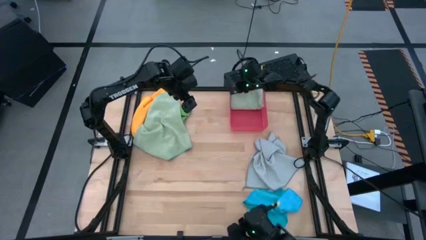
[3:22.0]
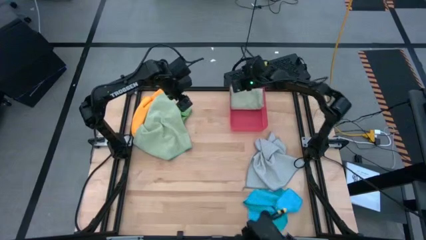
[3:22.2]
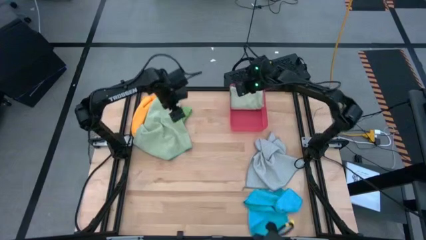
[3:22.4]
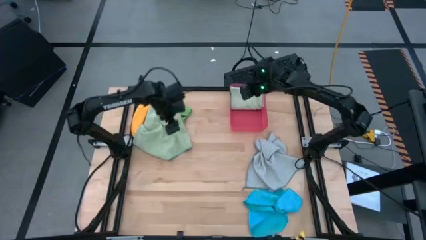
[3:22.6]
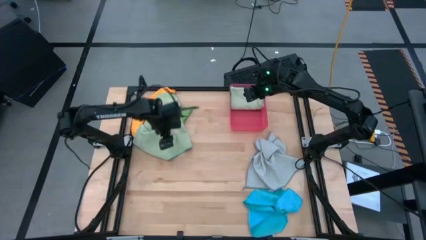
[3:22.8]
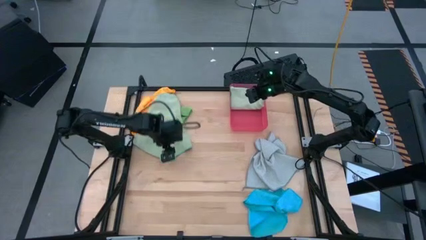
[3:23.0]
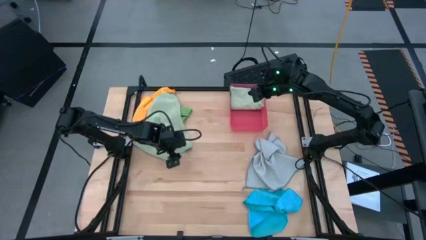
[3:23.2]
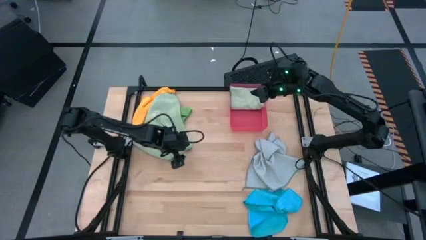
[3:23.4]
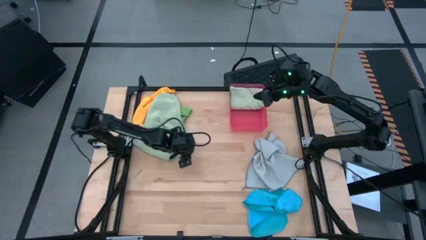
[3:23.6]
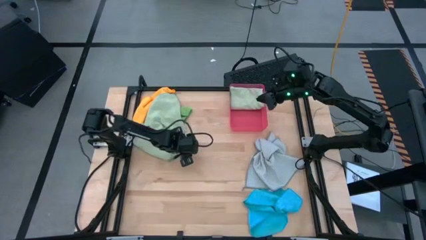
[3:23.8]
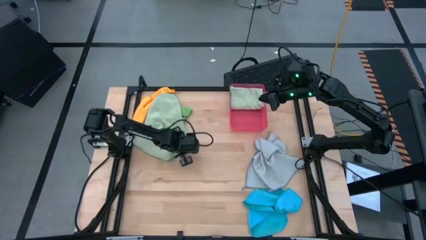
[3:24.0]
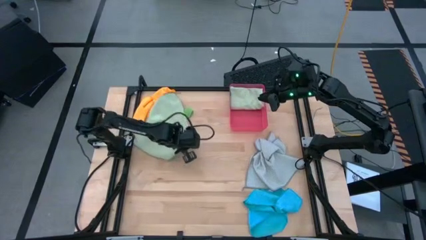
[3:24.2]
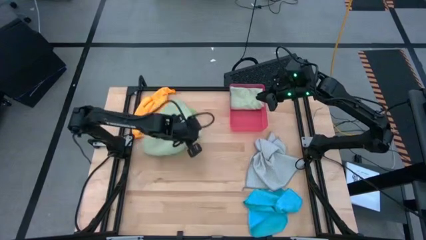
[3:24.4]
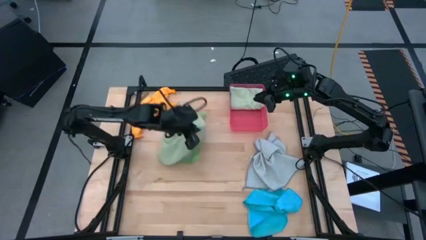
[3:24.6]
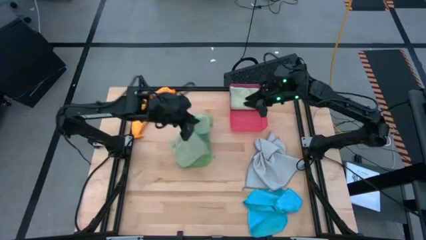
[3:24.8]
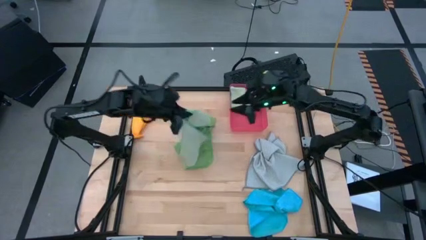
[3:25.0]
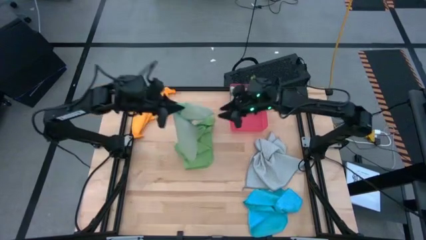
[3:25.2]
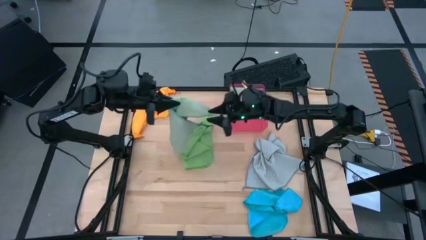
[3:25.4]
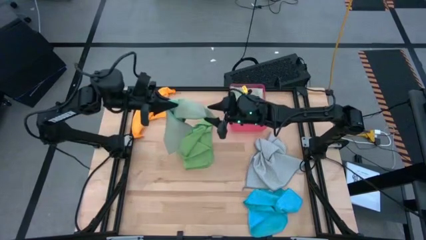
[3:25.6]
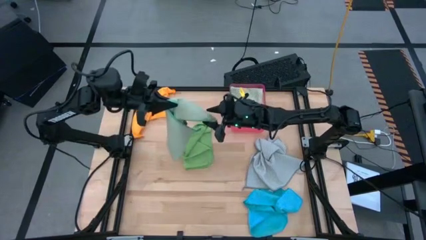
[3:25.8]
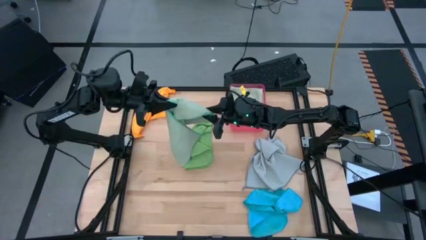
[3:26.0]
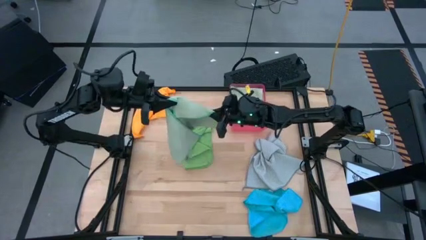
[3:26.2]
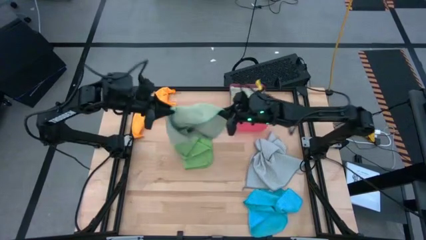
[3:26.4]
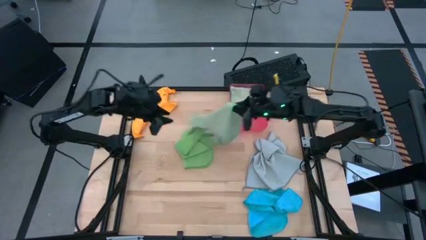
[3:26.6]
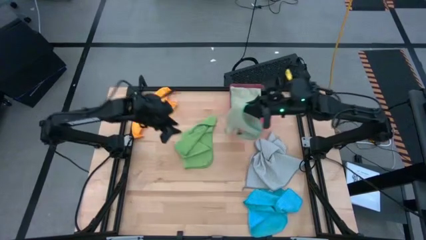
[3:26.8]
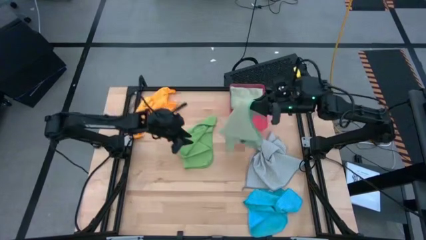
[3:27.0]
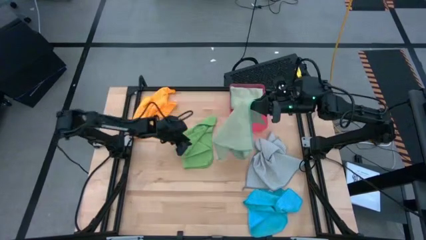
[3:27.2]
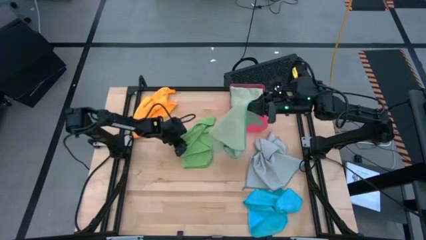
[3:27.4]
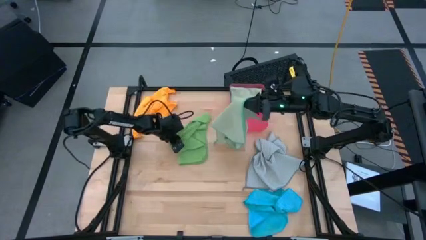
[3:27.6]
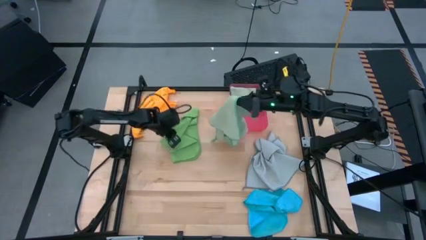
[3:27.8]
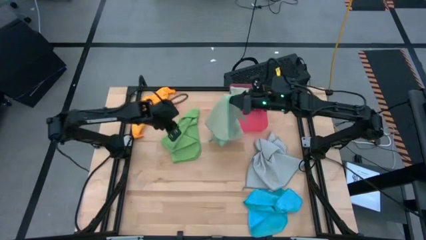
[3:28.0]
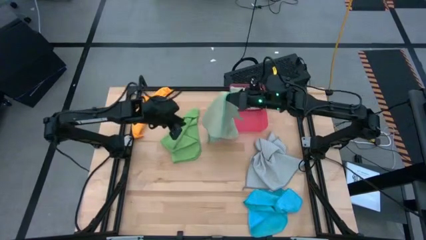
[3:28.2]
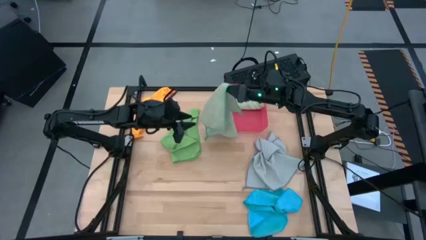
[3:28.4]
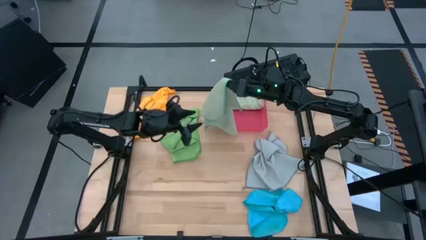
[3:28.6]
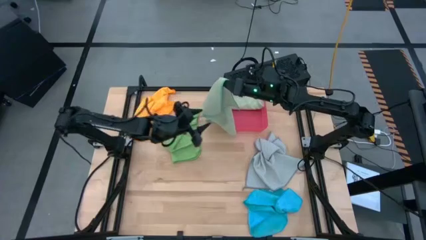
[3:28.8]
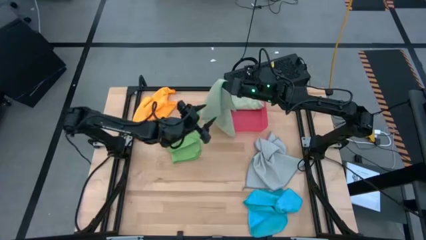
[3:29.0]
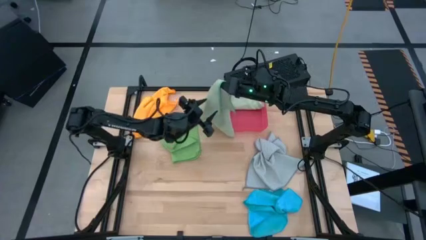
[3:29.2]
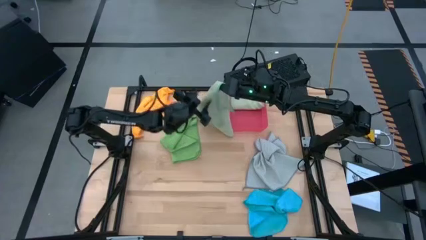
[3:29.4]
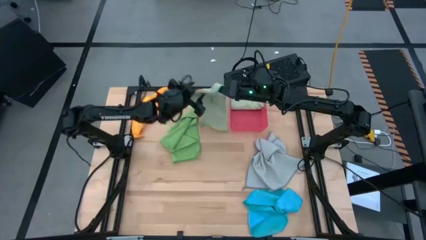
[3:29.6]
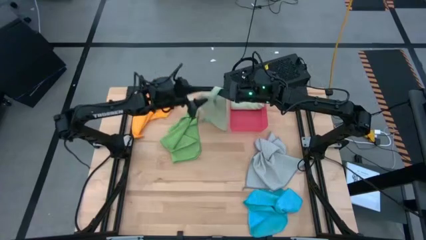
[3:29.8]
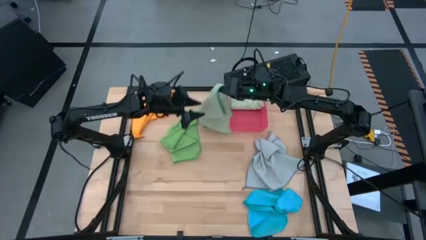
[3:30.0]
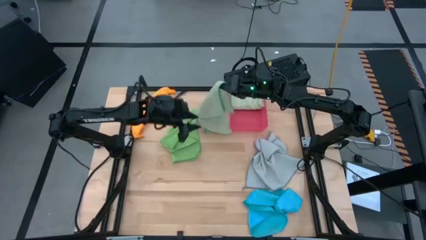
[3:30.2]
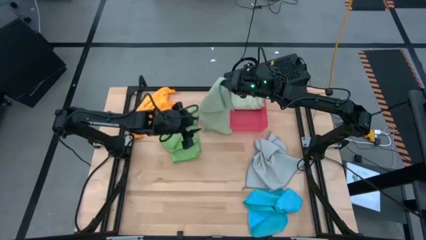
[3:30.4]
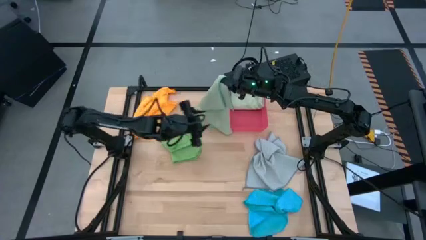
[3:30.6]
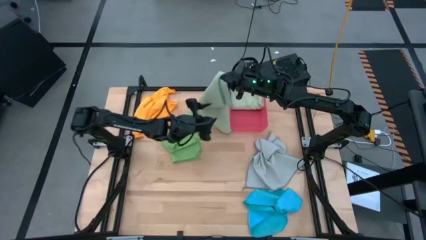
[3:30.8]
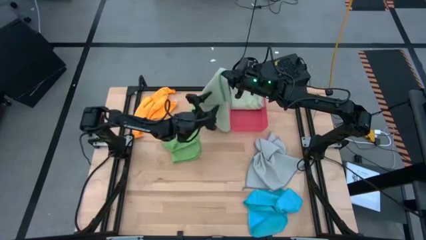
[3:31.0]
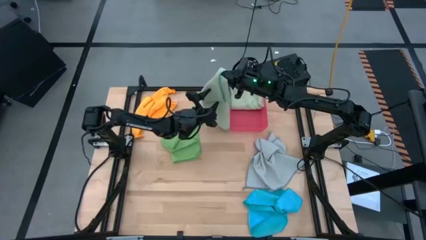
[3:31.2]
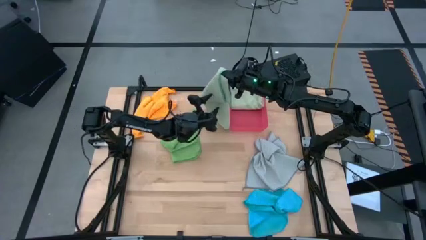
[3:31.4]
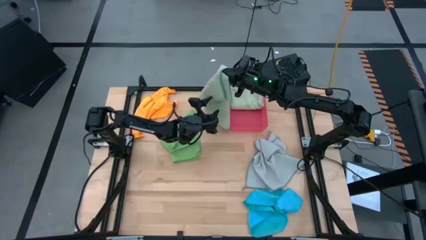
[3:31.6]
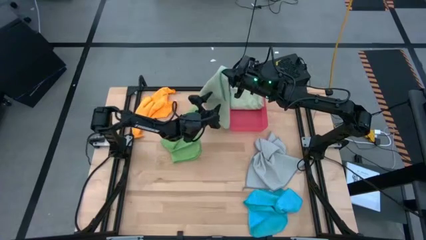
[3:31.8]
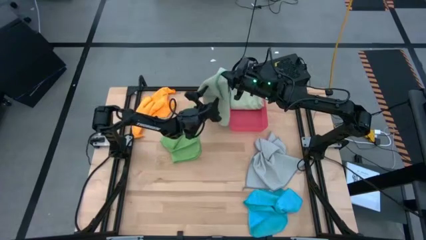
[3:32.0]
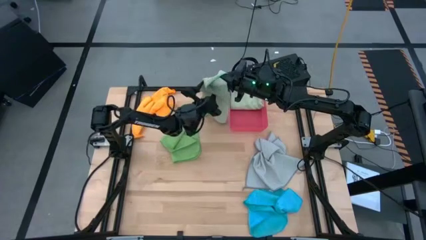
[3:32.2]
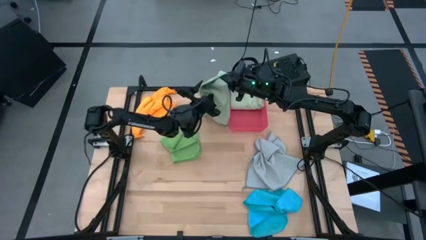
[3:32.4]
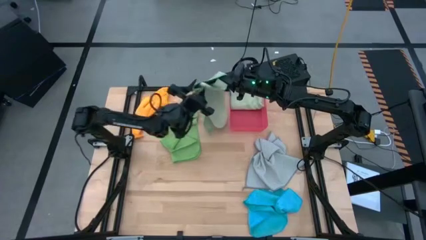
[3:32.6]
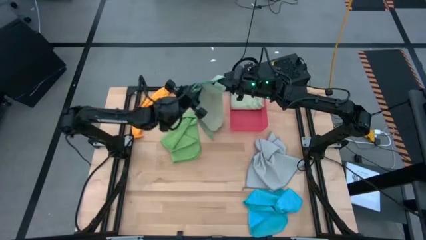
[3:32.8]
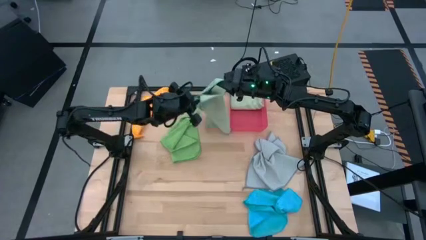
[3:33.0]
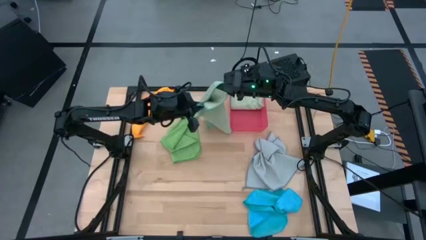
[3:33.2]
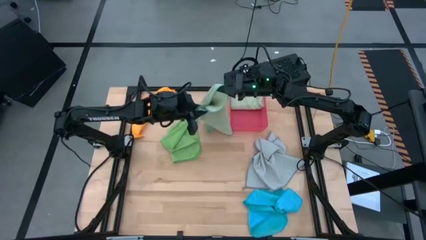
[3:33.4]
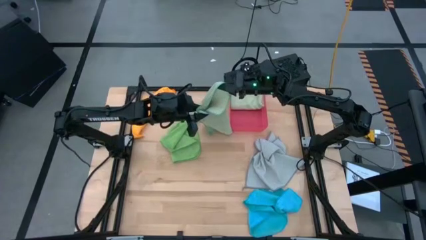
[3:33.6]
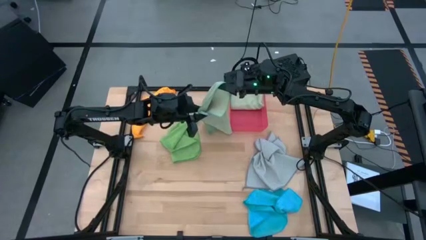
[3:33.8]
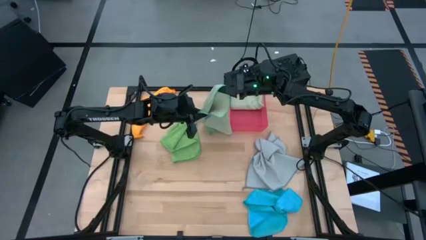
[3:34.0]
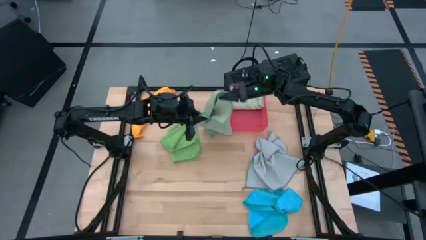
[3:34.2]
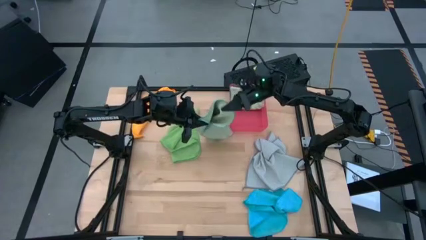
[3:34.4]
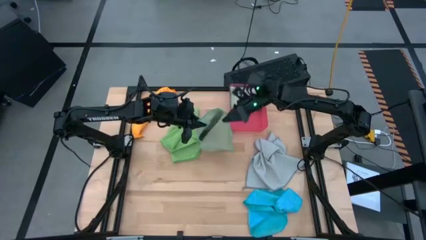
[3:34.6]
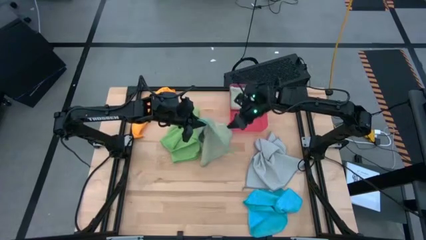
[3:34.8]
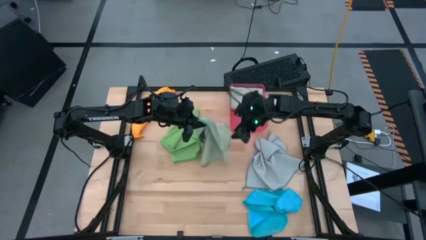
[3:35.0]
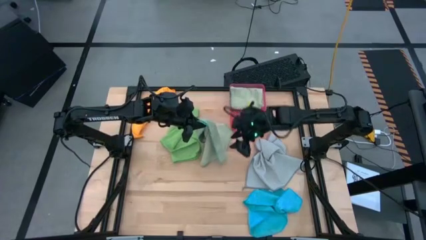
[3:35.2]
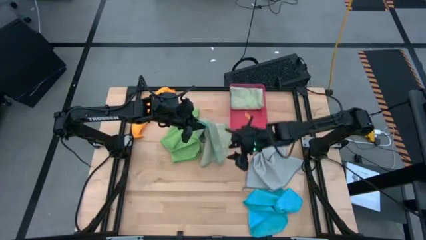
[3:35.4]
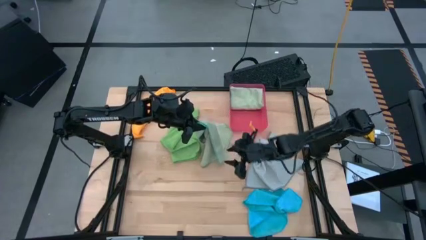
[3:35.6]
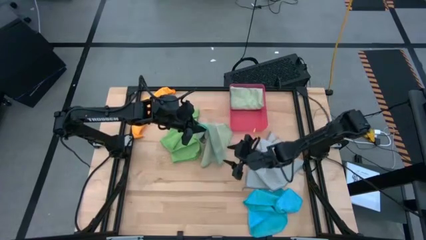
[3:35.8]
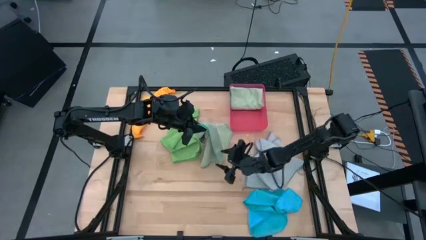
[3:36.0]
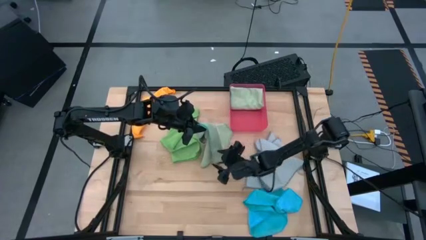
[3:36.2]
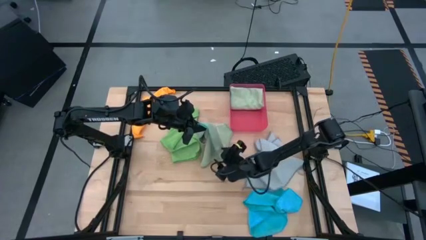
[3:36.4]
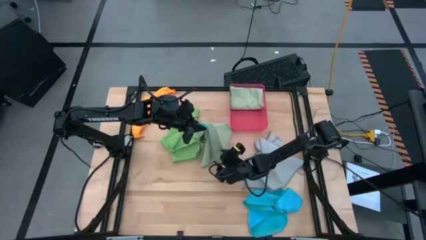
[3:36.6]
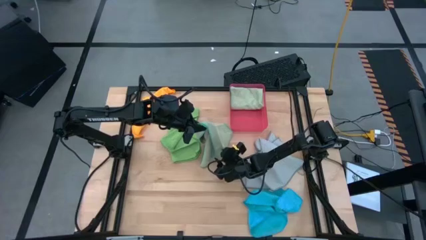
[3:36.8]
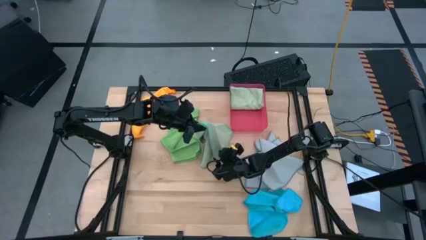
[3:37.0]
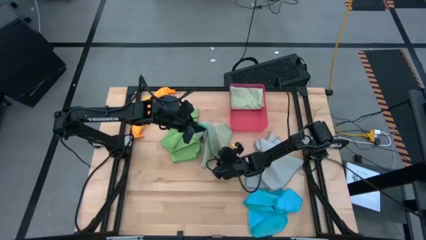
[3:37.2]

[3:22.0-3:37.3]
Task: Fold microfiber towels
Fold the light green microfiber cloth
